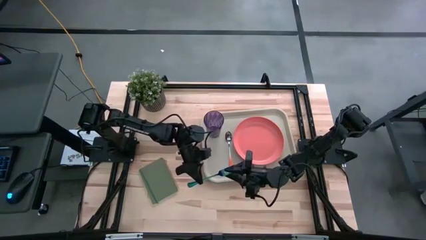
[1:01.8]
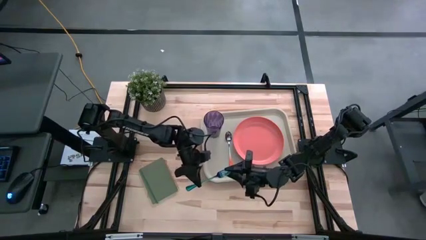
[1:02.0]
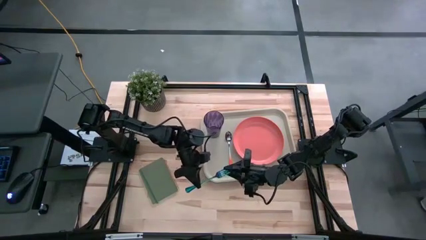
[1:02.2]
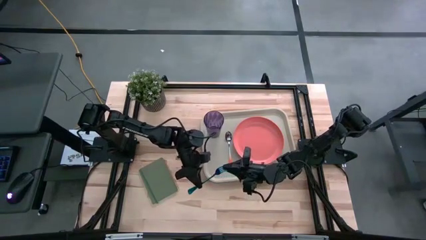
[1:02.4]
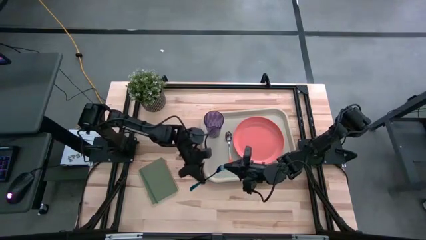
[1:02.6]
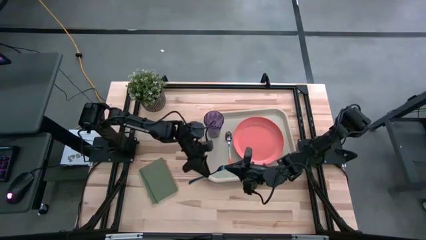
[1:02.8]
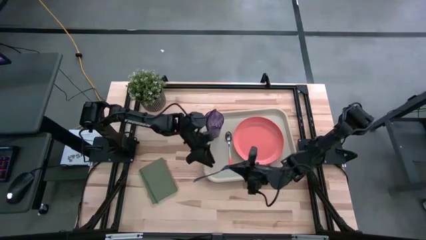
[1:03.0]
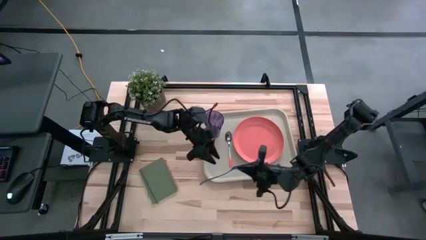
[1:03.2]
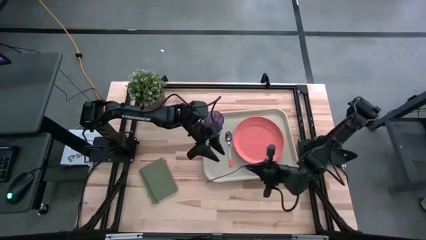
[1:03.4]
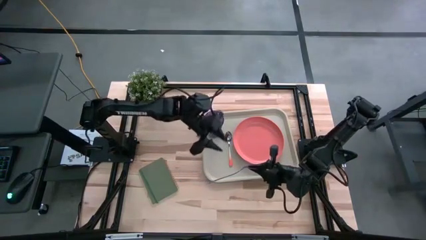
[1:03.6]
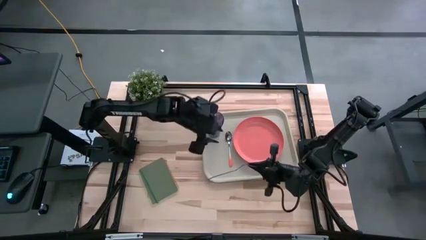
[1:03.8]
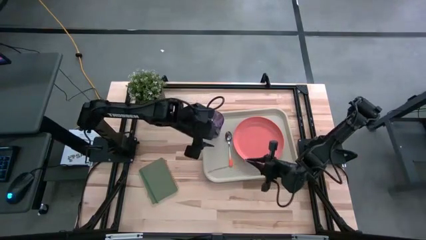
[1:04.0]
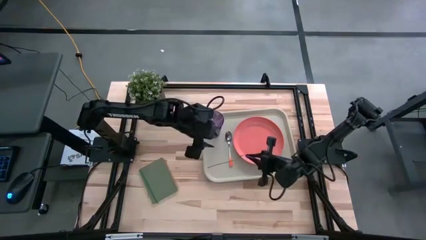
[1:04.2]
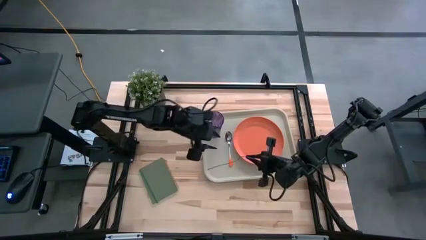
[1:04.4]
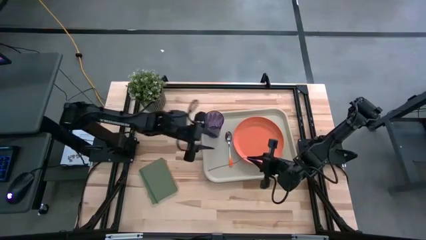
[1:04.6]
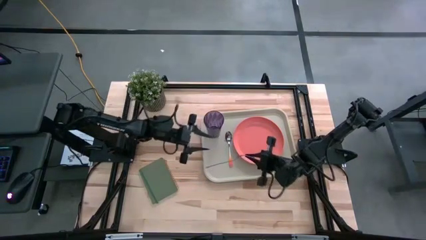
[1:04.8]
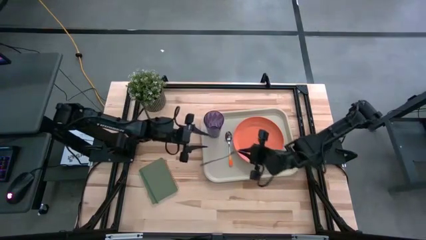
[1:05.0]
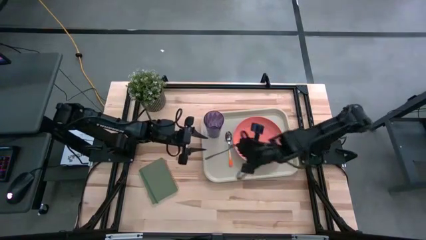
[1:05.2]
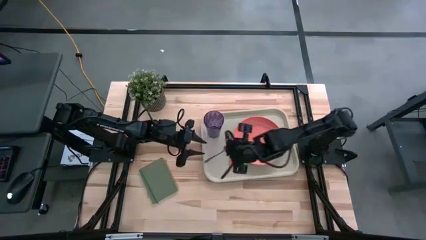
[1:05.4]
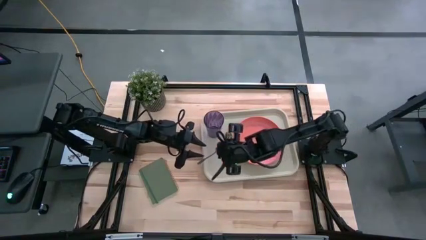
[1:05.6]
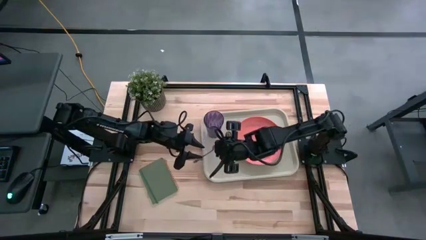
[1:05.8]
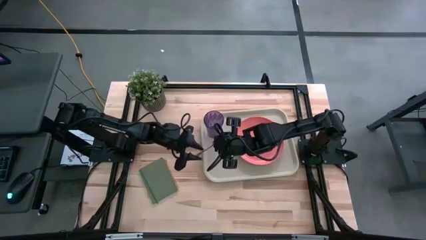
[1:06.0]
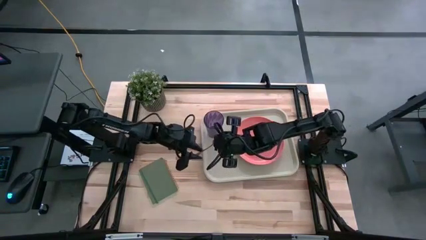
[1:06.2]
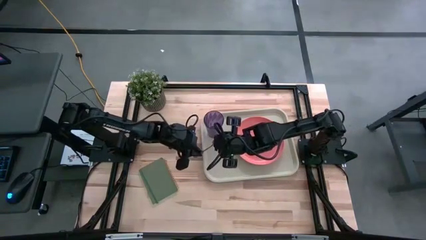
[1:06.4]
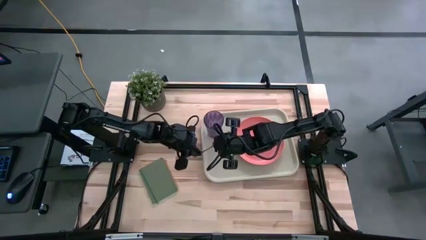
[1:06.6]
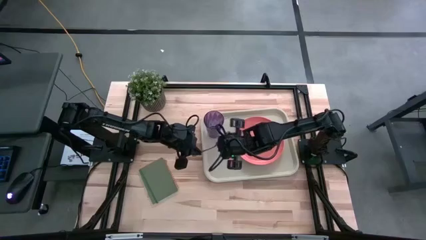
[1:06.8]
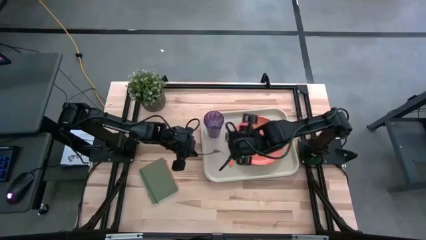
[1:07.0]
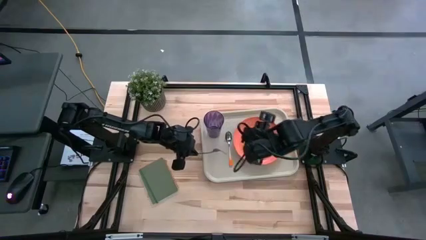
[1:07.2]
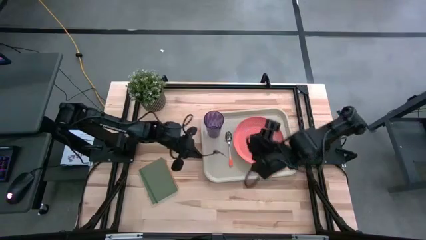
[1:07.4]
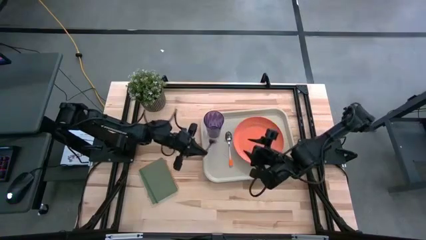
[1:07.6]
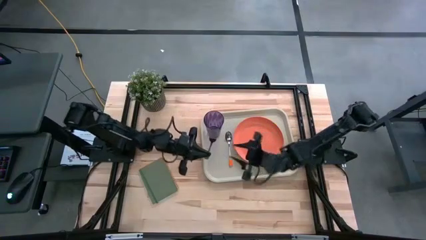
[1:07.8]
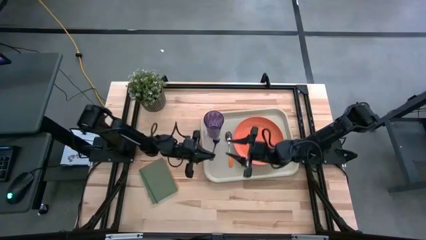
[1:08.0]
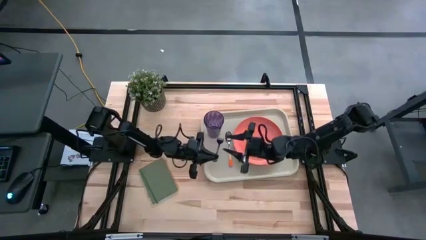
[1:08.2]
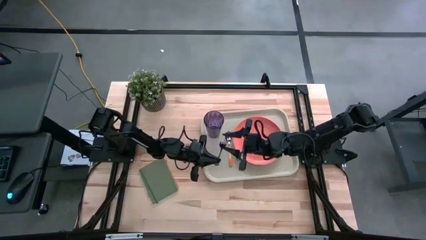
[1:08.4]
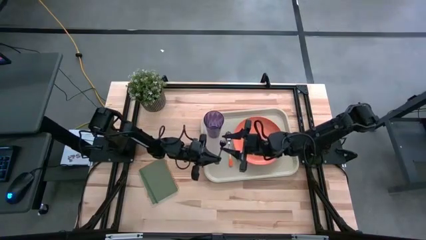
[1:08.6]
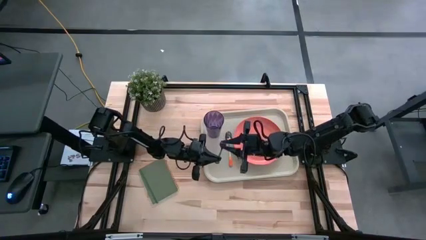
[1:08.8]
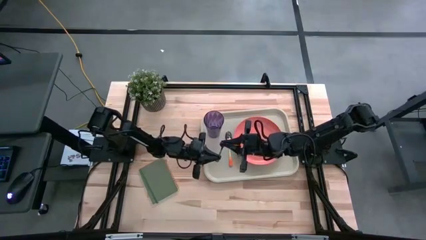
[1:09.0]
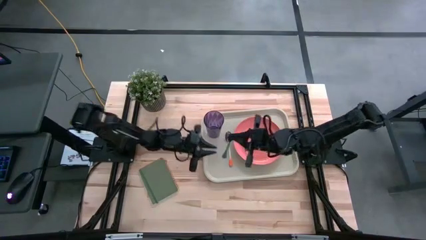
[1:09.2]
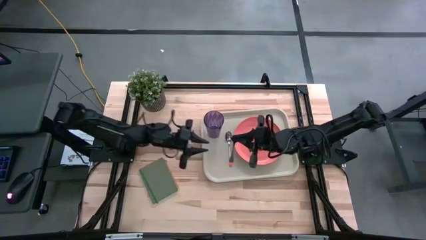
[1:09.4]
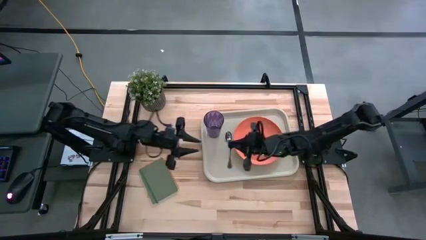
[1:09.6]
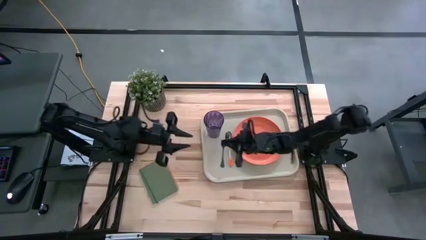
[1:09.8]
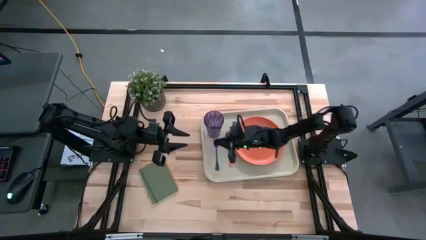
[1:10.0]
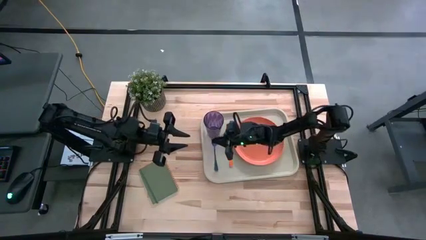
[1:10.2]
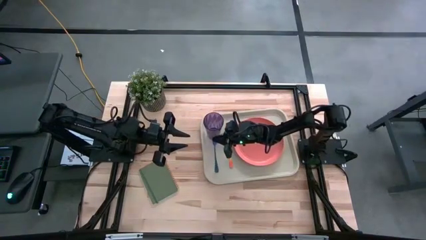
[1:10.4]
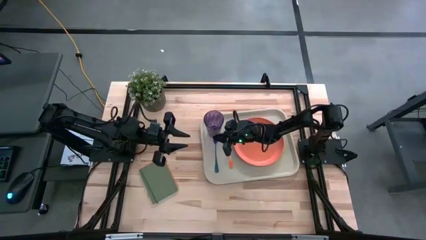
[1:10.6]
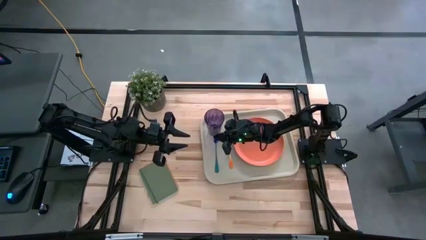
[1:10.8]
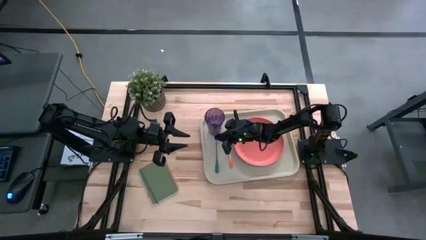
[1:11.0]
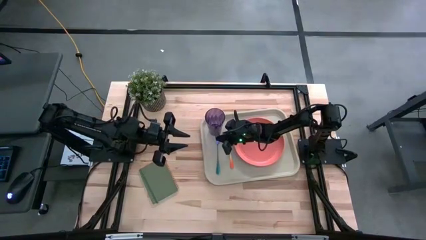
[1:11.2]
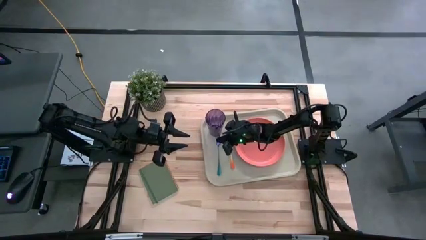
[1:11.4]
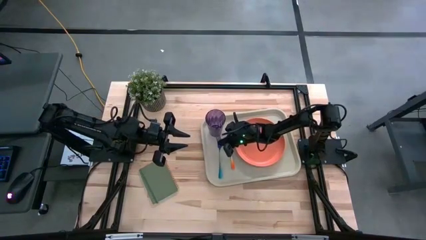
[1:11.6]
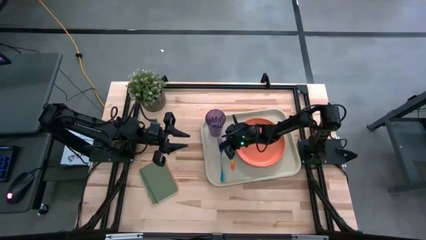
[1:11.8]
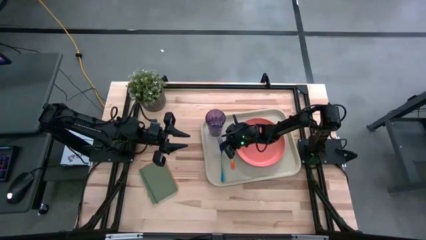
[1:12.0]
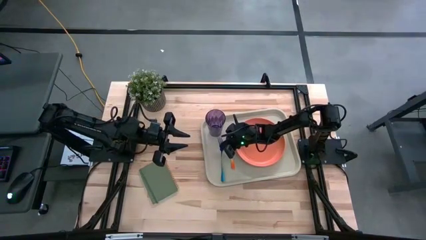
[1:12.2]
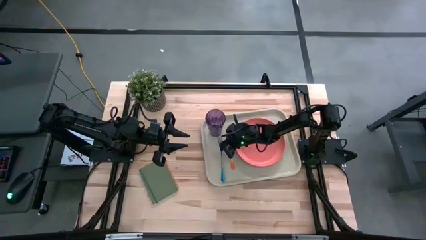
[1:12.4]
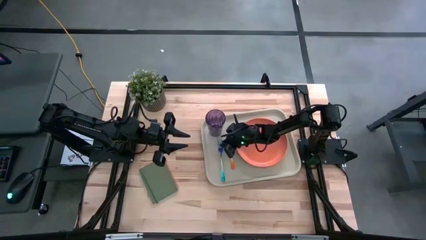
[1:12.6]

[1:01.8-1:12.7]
Task: Pick and place plate/cup/fork/spoon on tray
Put the blue fork on the gray serving tray to the left of the orange spoon

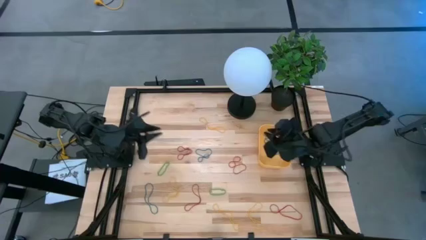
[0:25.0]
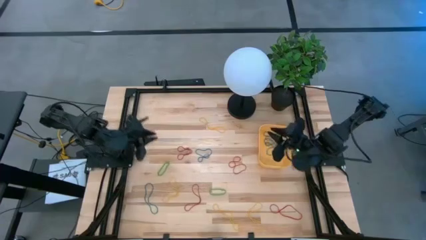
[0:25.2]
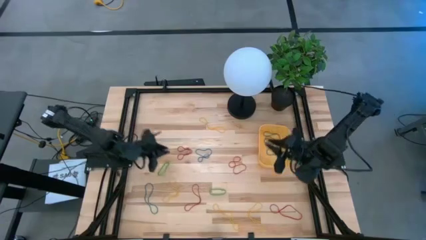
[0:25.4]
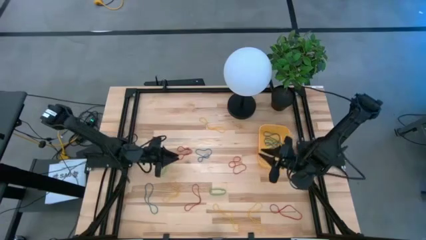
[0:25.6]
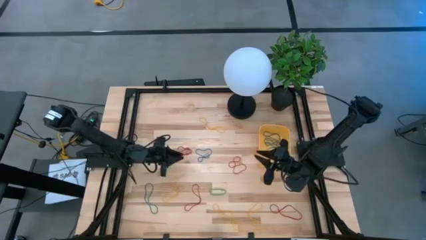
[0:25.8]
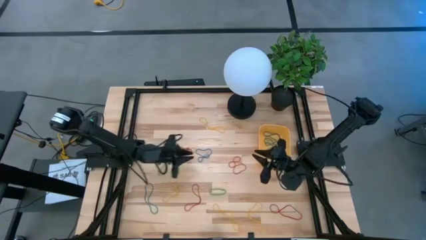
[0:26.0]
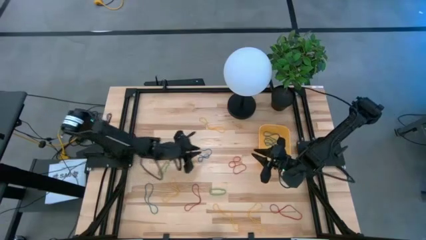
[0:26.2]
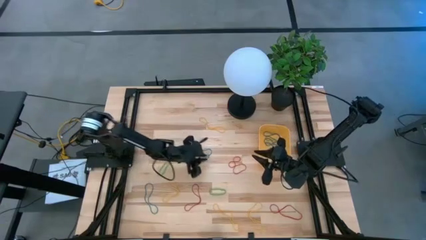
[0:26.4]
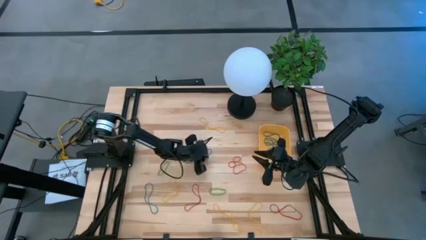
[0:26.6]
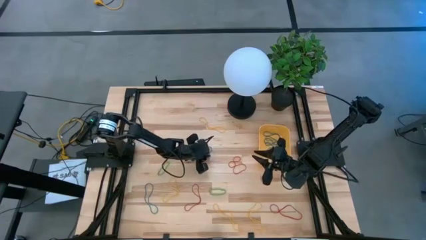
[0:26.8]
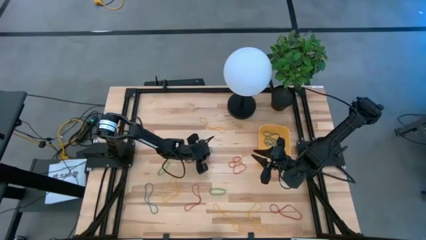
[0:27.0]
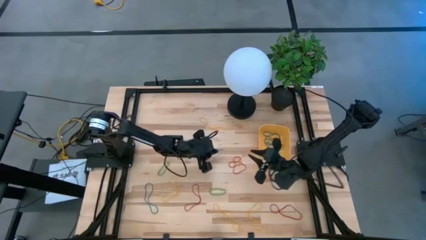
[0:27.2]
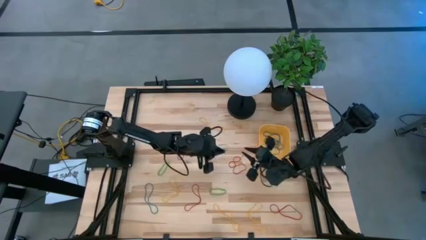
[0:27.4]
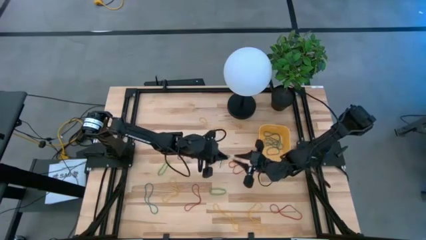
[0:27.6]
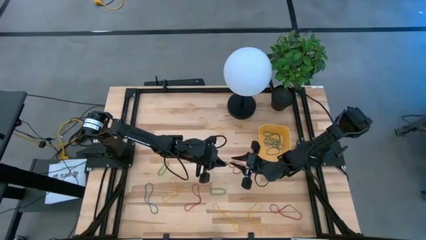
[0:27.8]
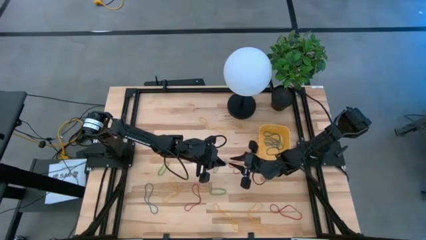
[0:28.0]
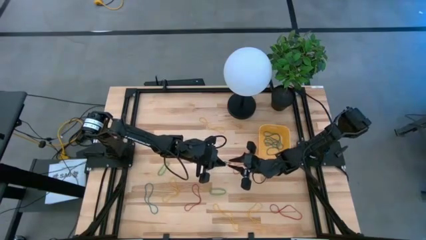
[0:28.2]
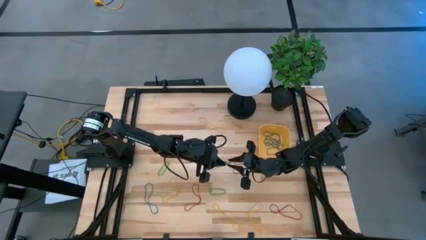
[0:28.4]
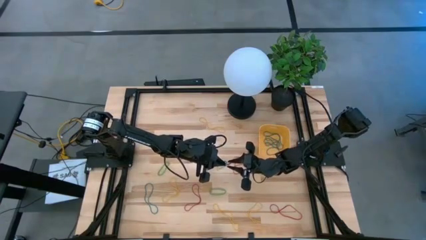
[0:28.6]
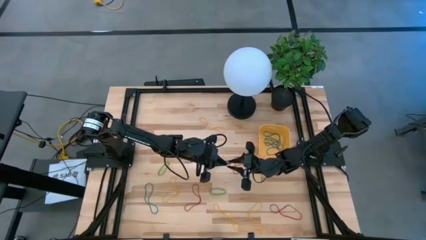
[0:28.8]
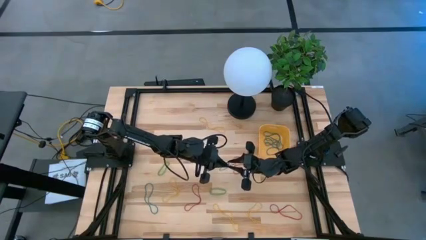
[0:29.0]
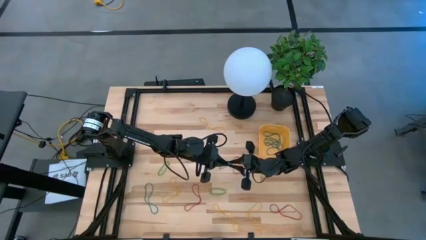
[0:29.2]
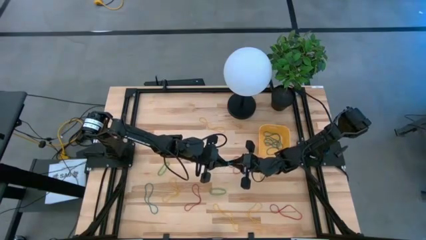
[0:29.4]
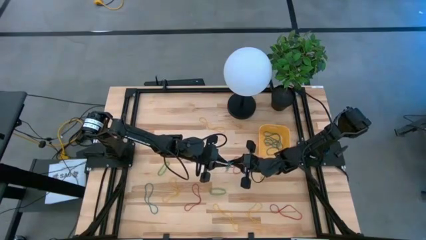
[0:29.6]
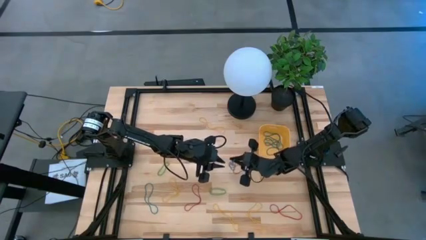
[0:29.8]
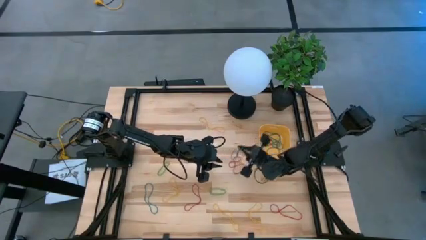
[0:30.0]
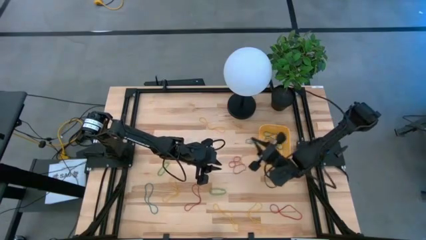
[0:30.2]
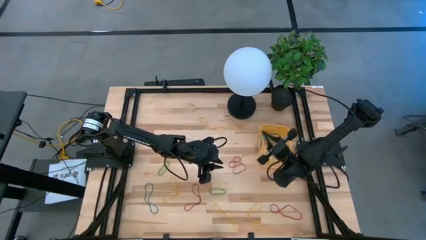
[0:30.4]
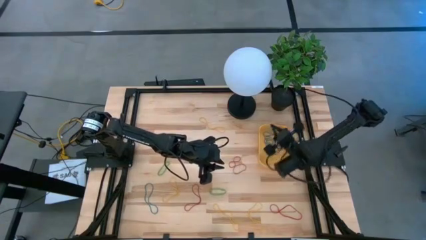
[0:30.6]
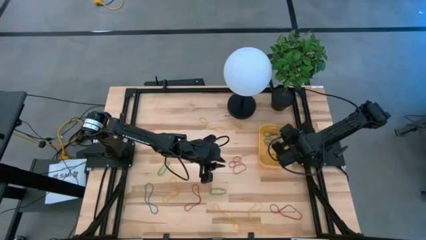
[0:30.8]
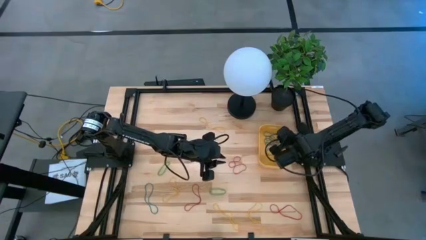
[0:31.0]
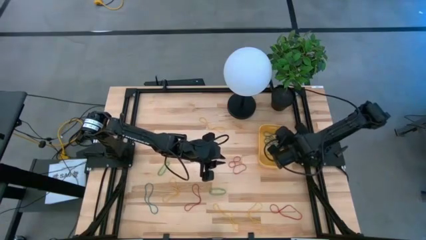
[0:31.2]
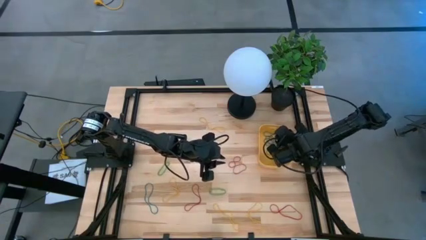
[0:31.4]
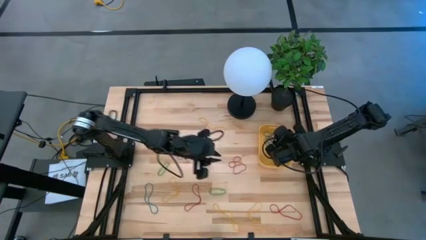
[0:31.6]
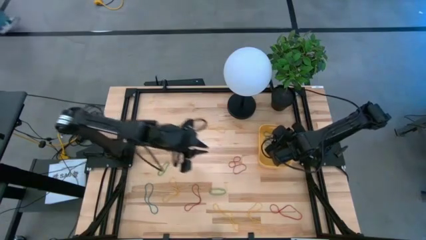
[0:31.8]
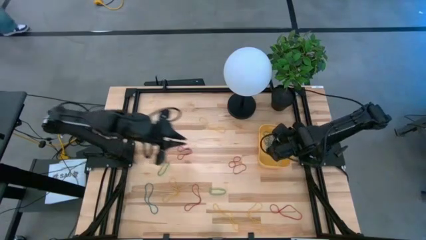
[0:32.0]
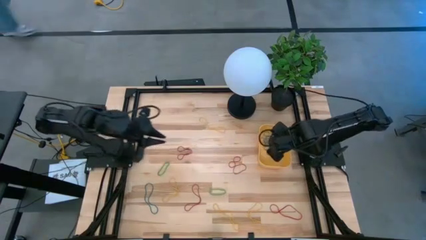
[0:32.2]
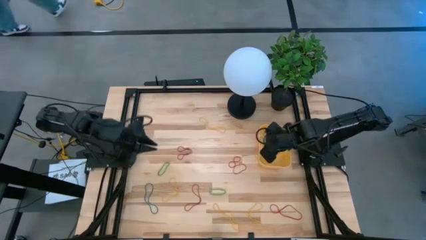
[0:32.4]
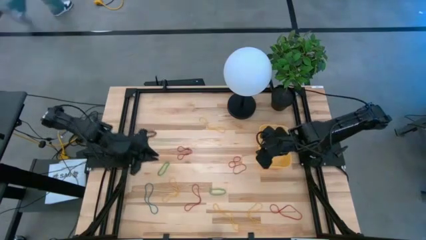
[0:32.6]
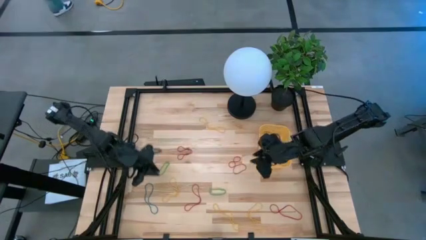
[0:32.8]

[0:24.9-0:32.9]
Task: Pick and place items into bin
Put the blue rubber band into the bin
